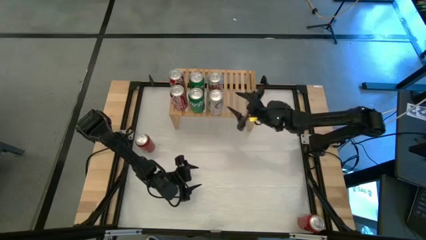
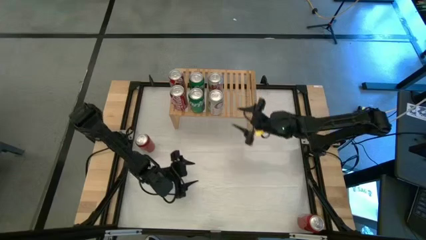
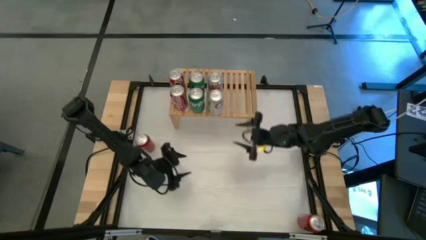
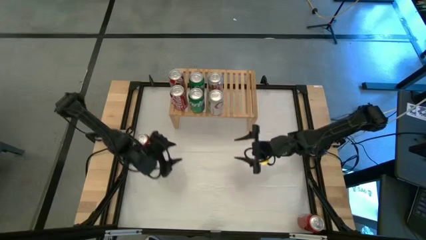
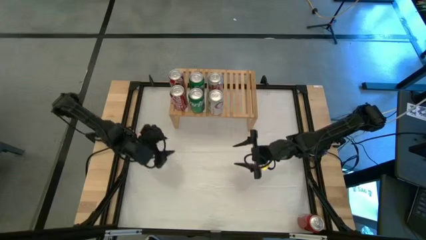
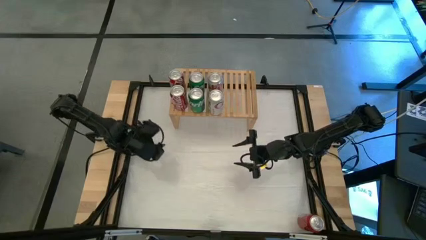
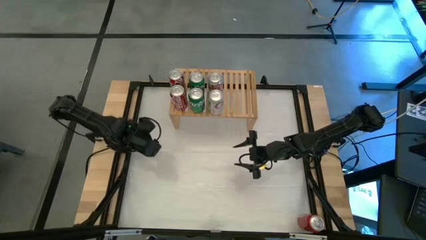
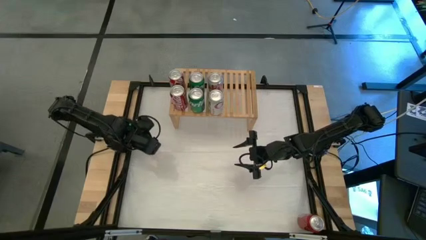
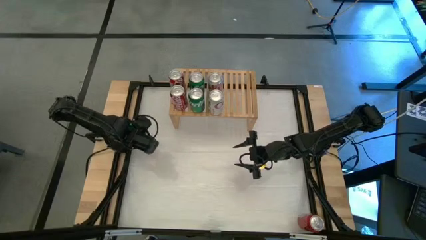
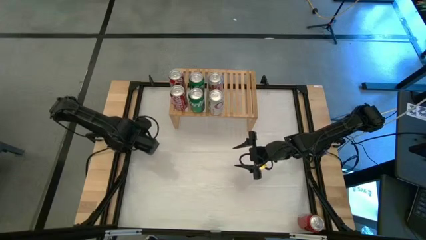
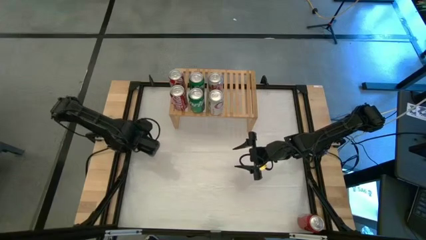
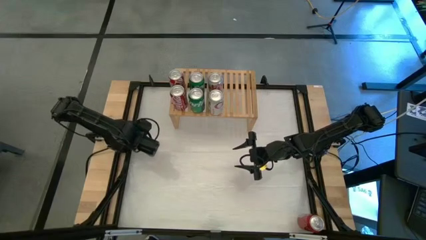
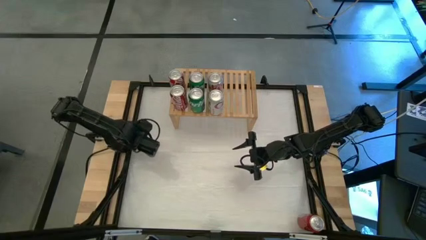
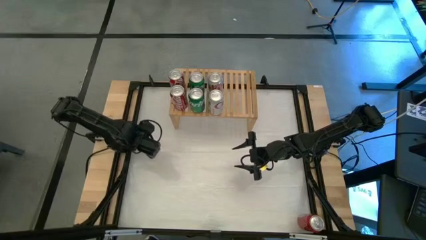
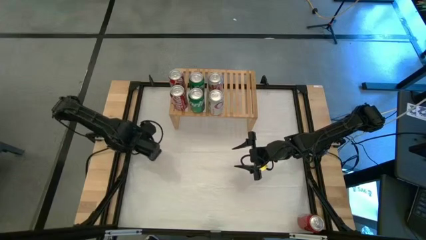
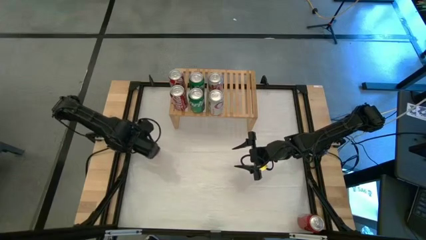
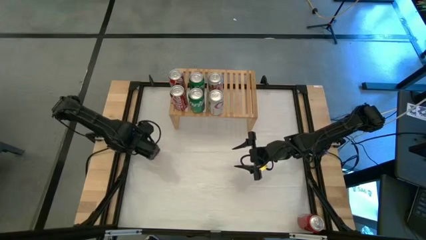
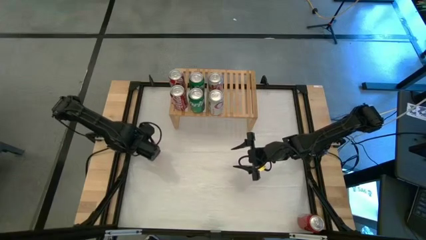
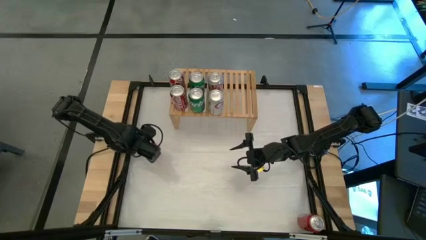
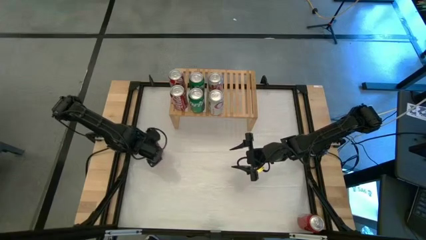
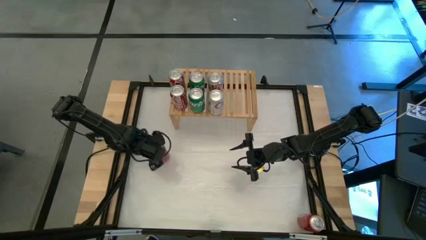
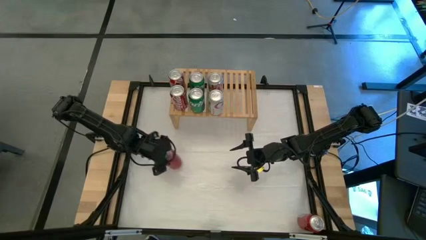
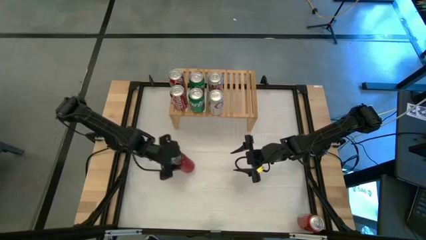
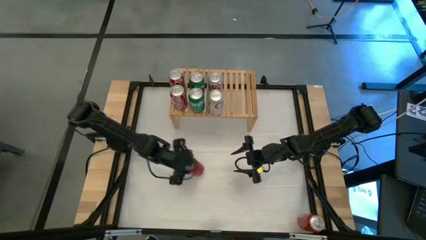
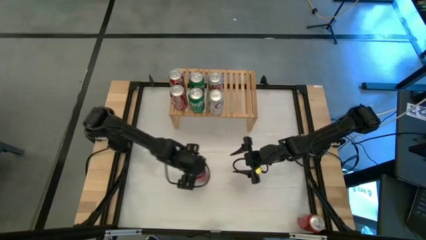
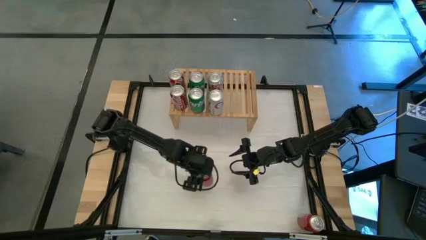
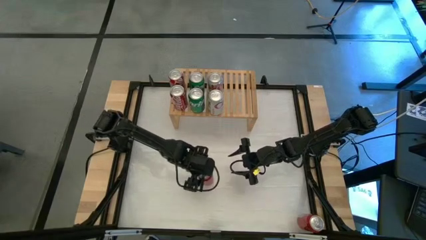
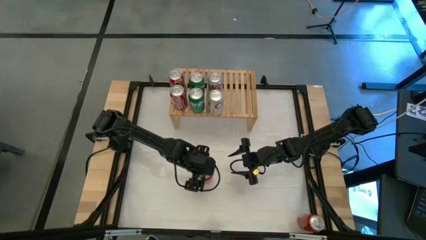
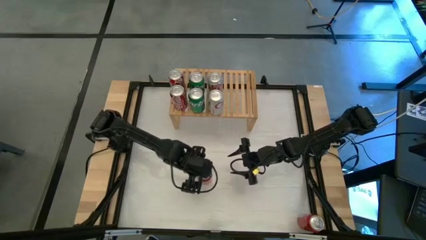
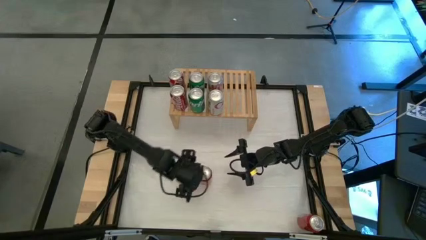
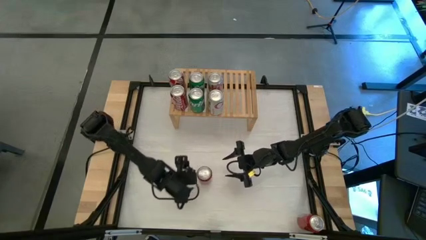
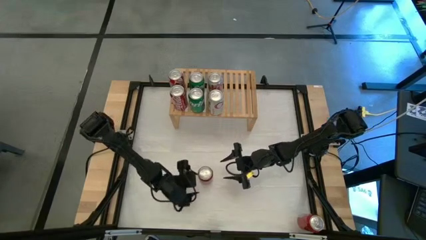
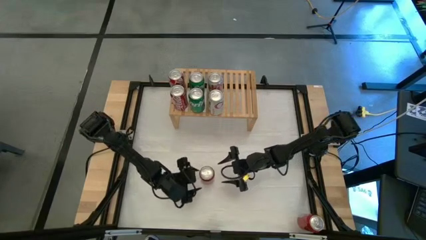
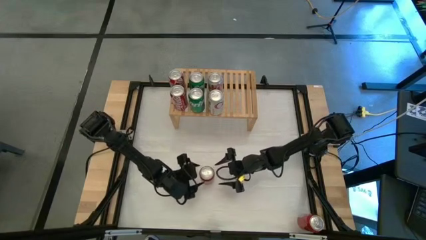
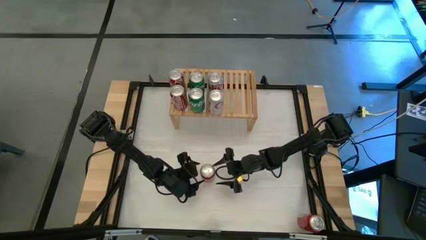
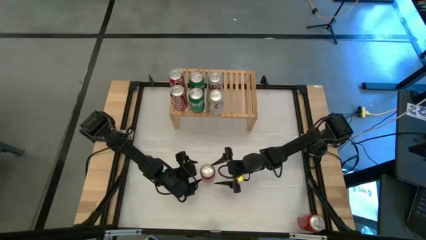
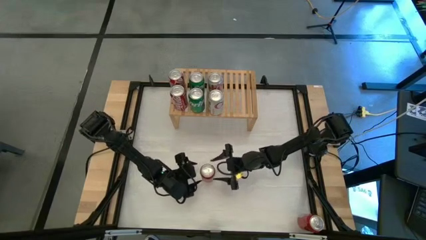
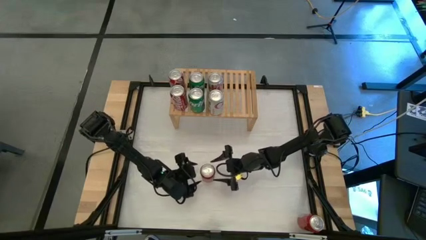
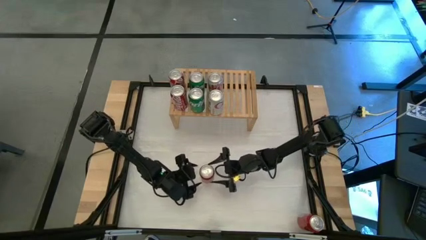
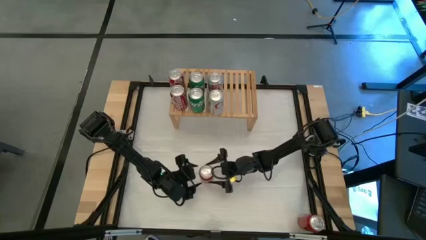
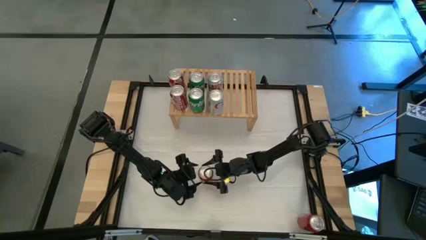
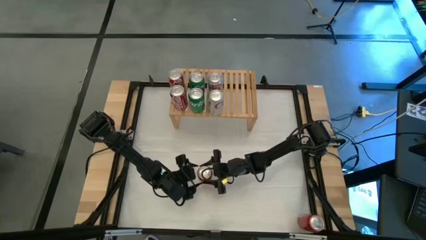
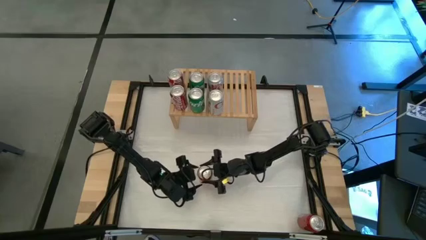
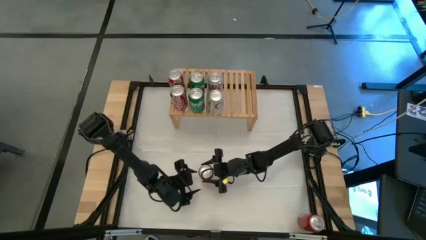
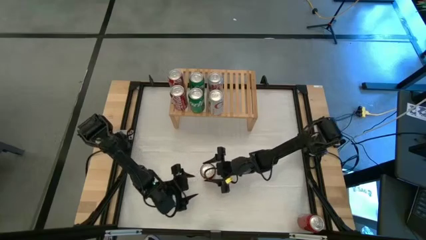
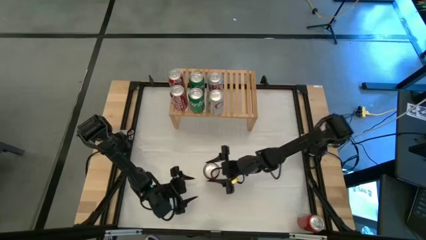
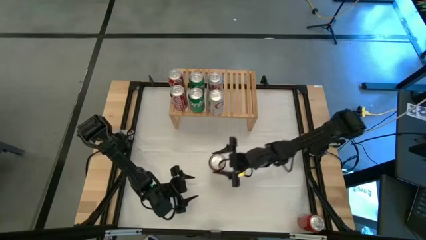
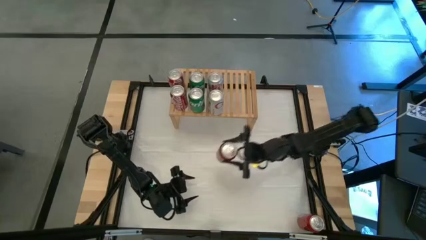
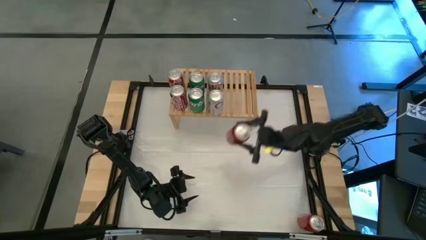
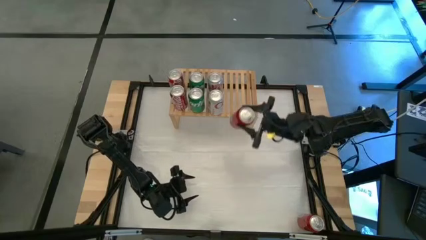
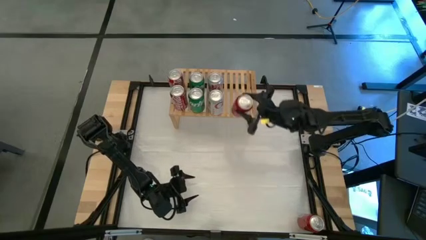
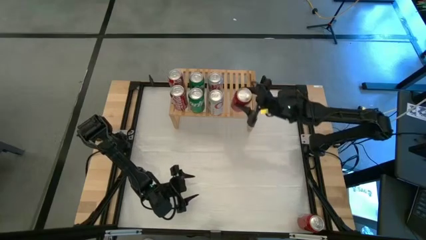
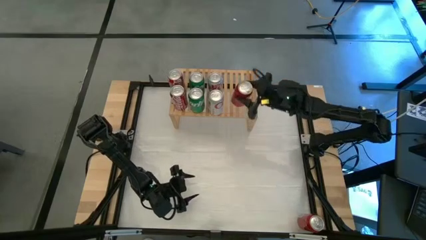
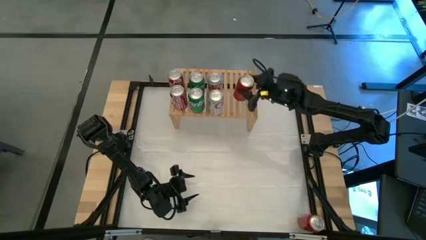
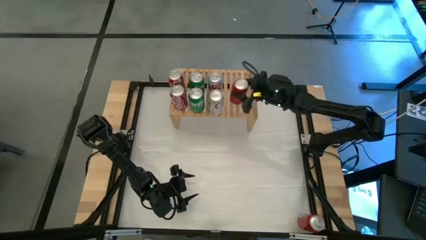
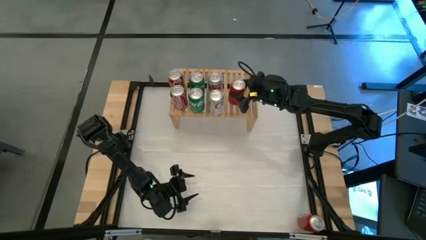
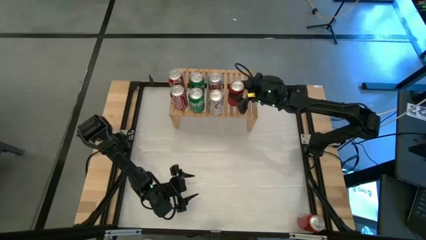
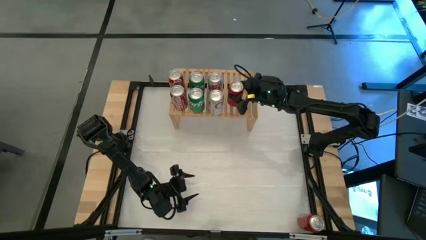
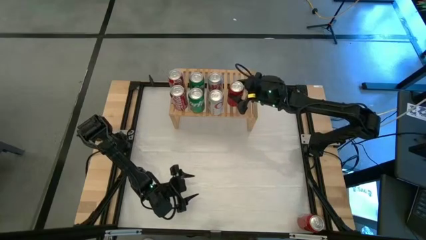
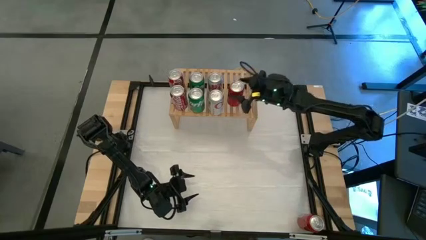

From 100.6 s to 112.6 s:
Task: Place canned beverage on shelf
Put the top red black soda can on the shelf
